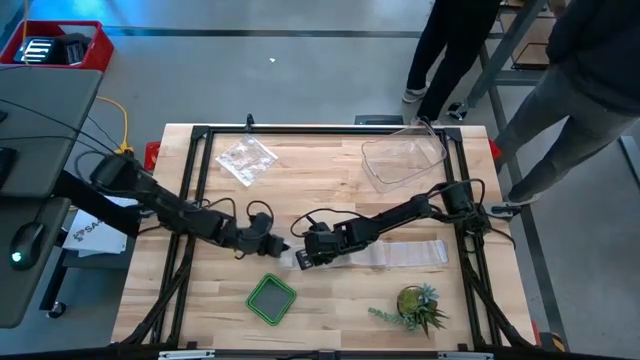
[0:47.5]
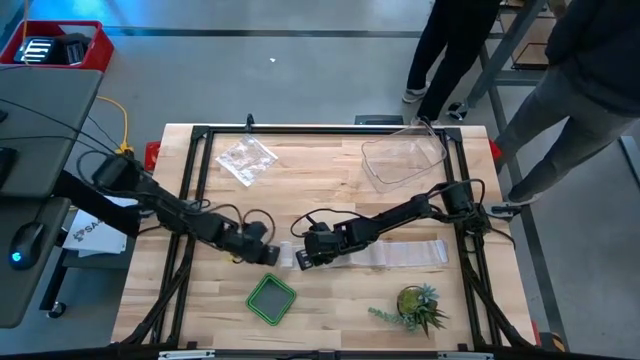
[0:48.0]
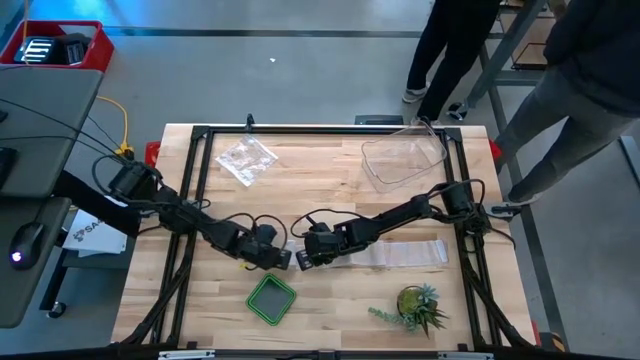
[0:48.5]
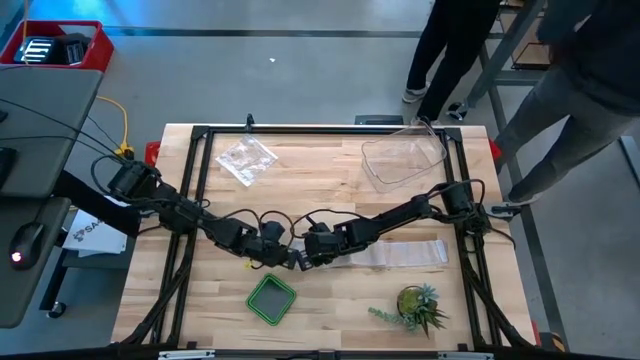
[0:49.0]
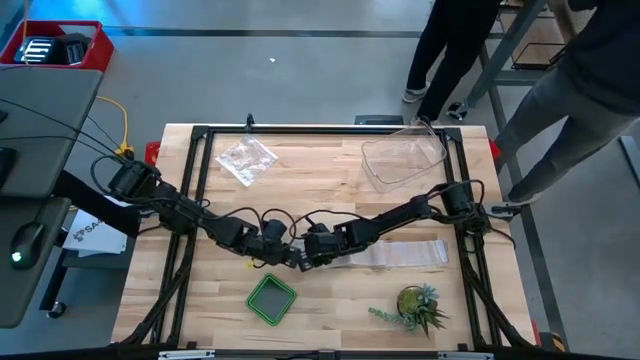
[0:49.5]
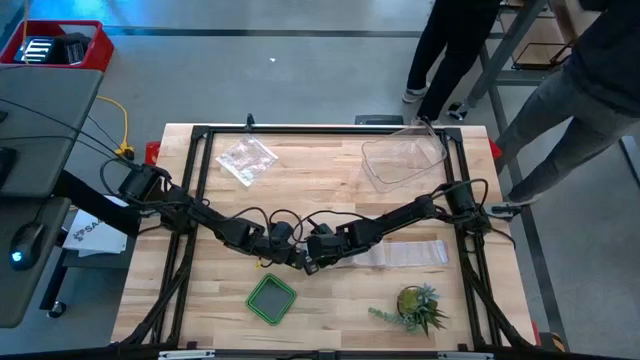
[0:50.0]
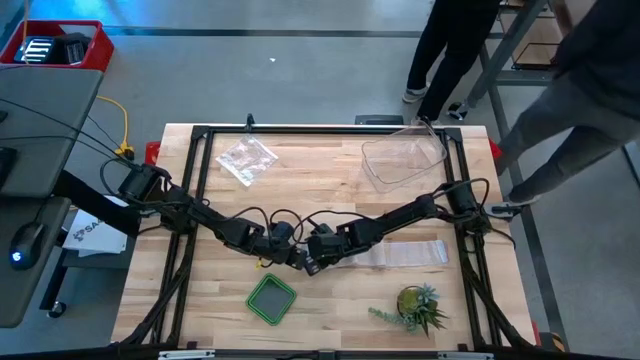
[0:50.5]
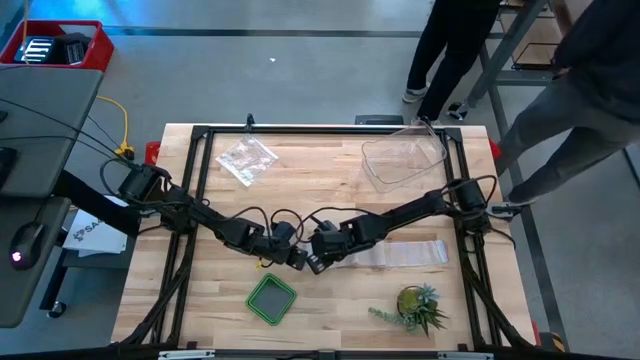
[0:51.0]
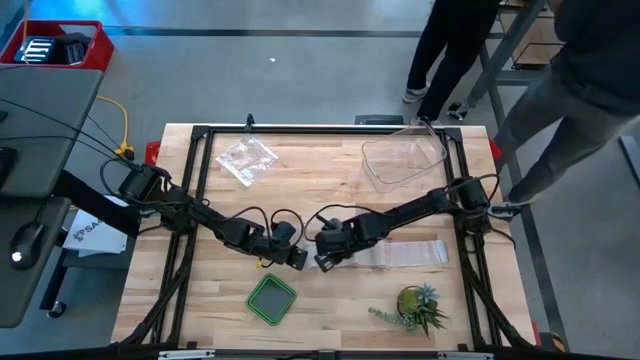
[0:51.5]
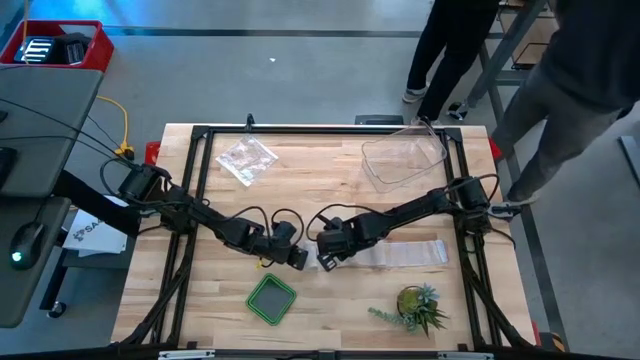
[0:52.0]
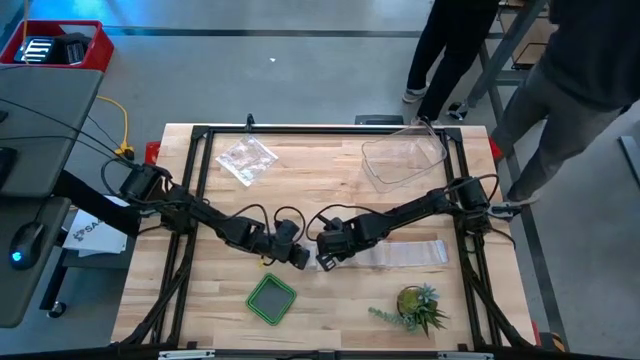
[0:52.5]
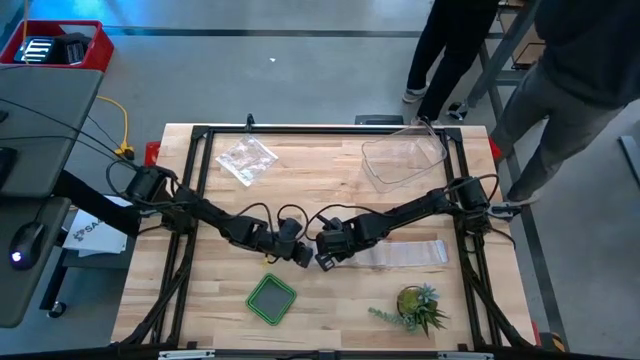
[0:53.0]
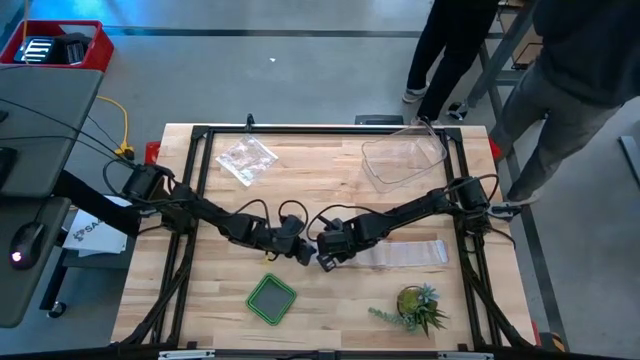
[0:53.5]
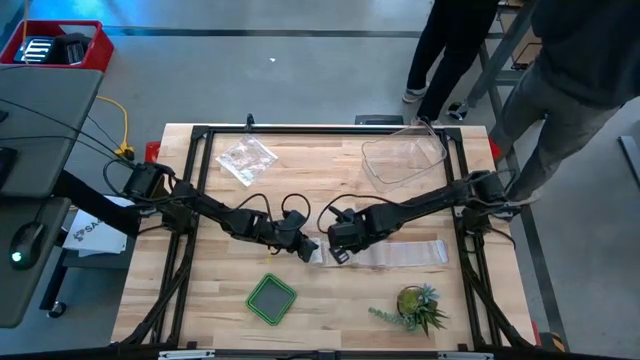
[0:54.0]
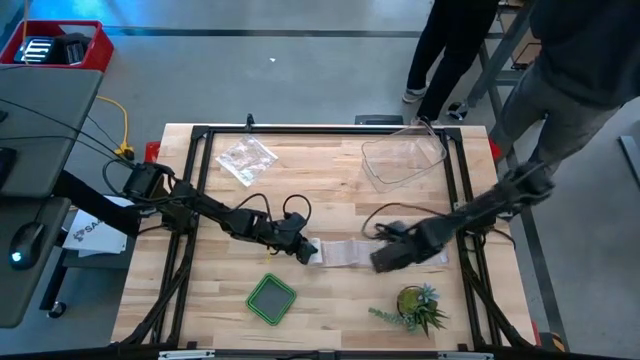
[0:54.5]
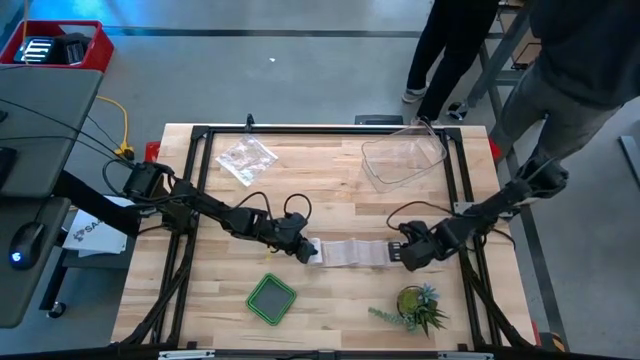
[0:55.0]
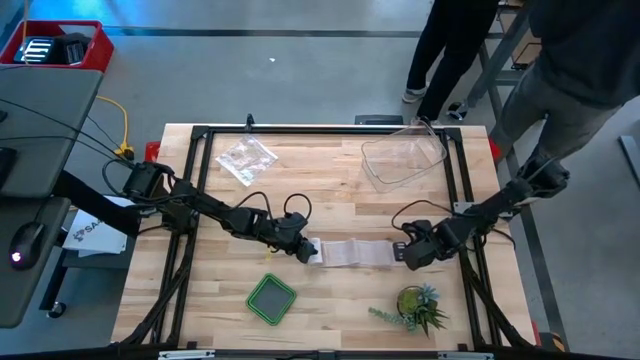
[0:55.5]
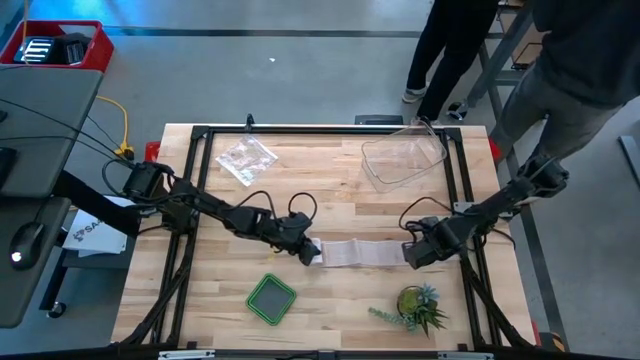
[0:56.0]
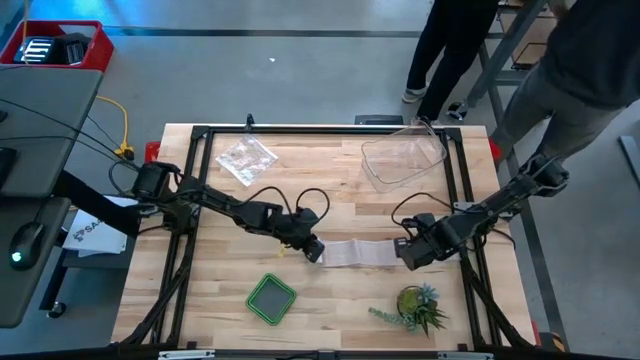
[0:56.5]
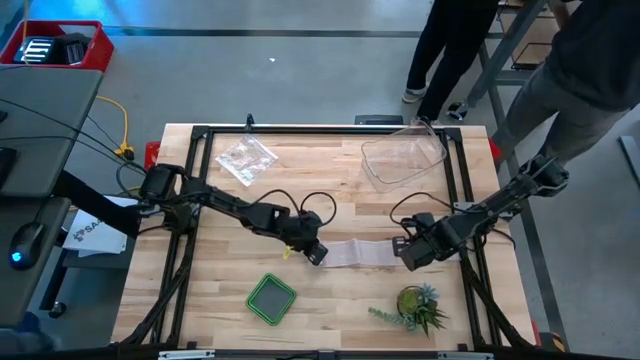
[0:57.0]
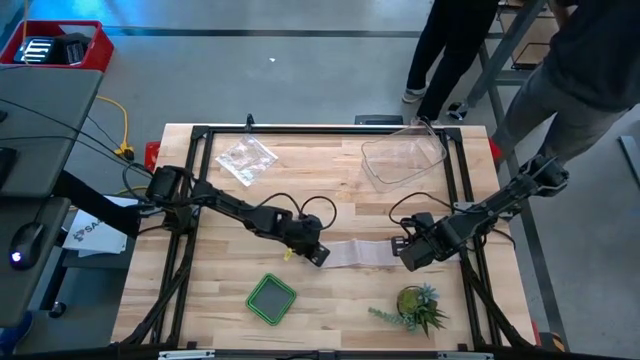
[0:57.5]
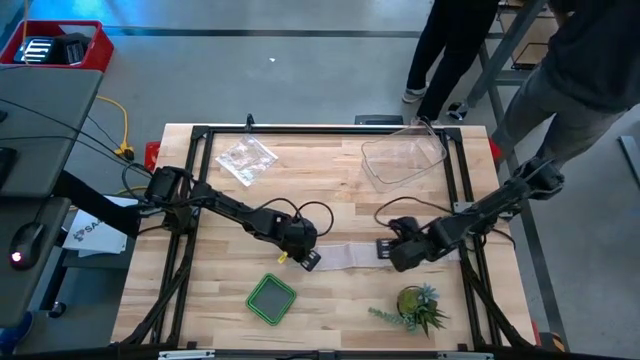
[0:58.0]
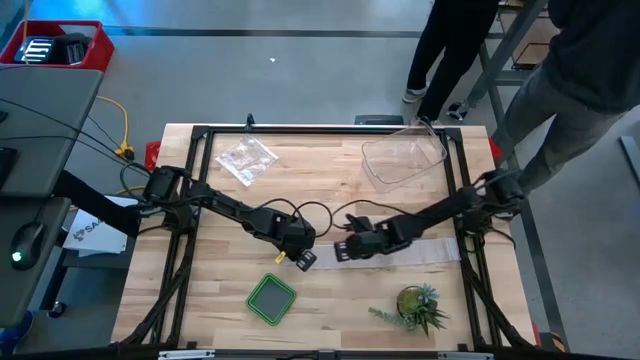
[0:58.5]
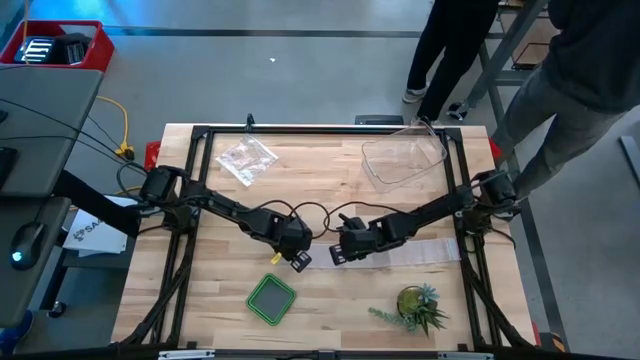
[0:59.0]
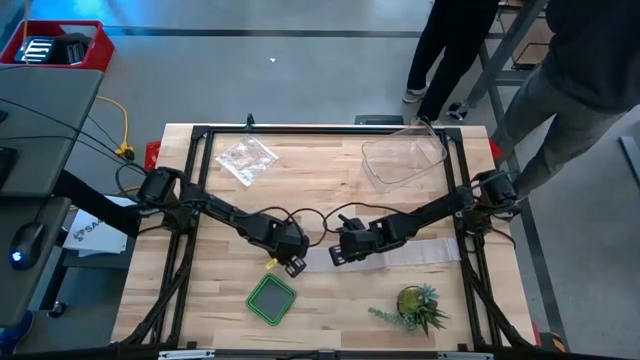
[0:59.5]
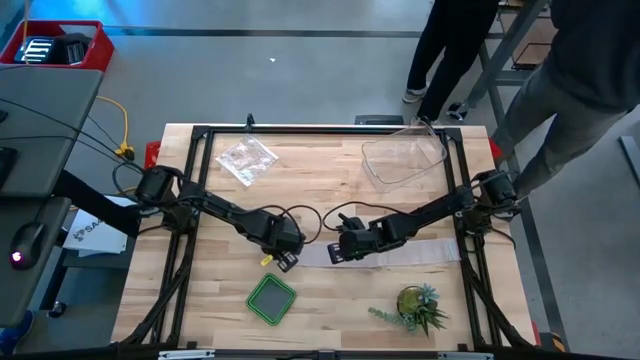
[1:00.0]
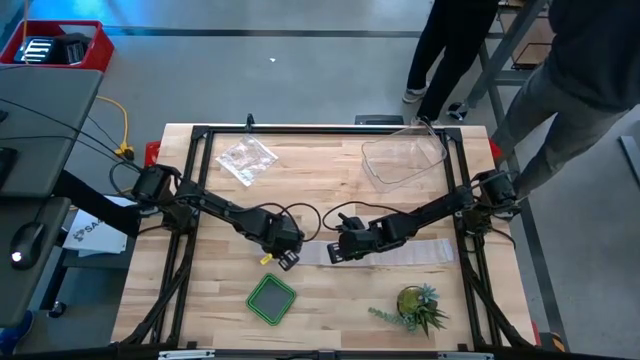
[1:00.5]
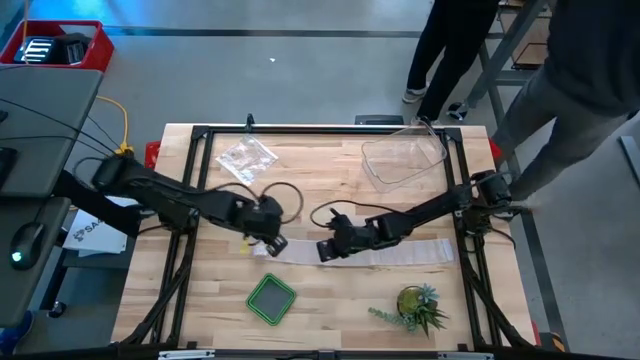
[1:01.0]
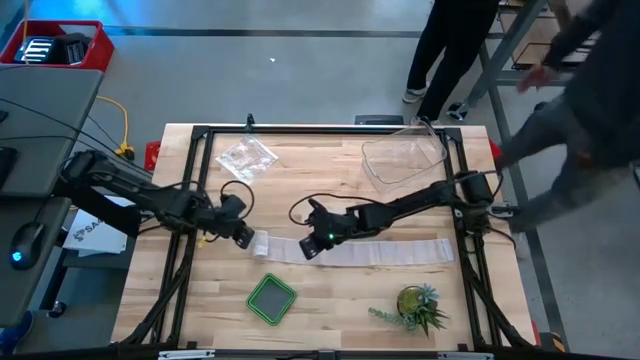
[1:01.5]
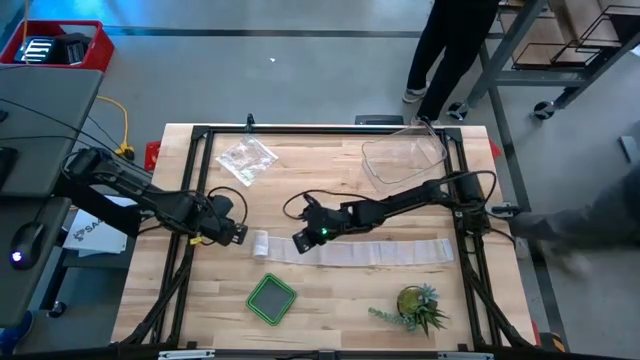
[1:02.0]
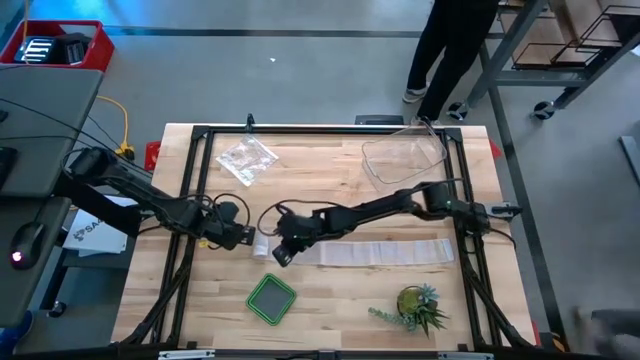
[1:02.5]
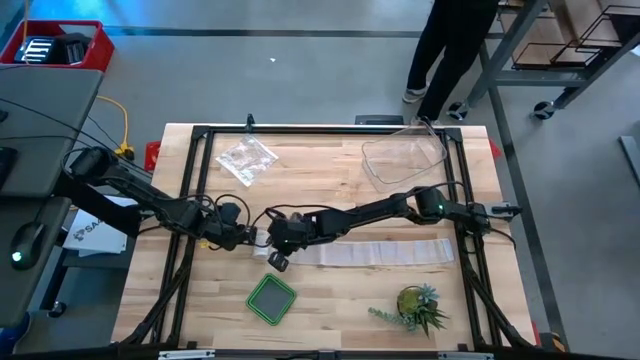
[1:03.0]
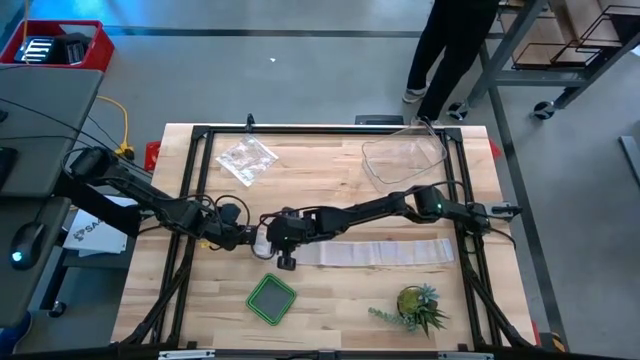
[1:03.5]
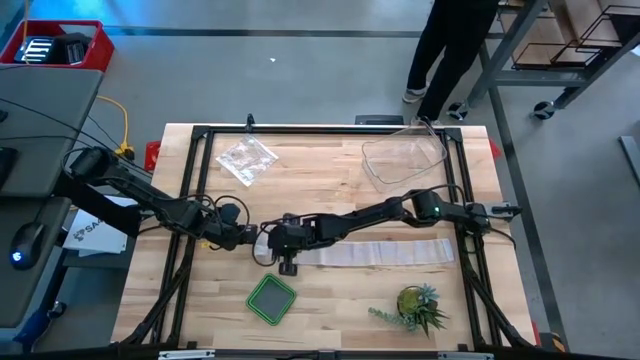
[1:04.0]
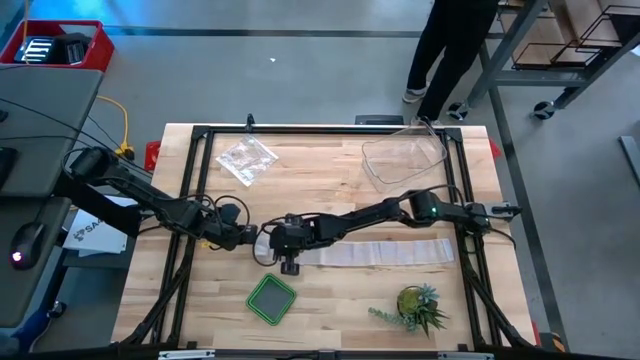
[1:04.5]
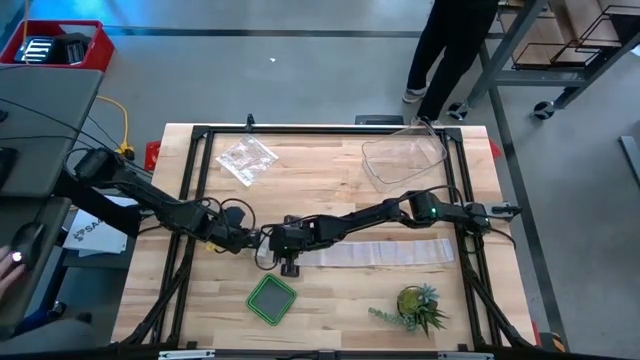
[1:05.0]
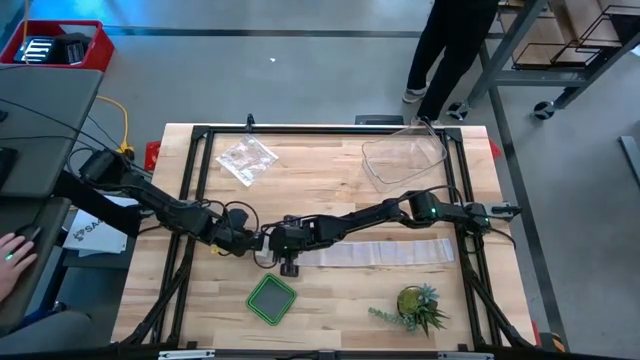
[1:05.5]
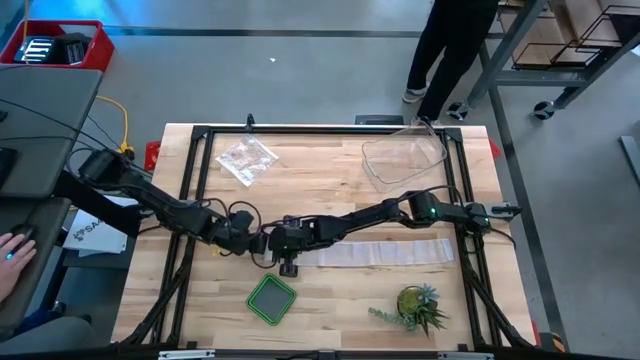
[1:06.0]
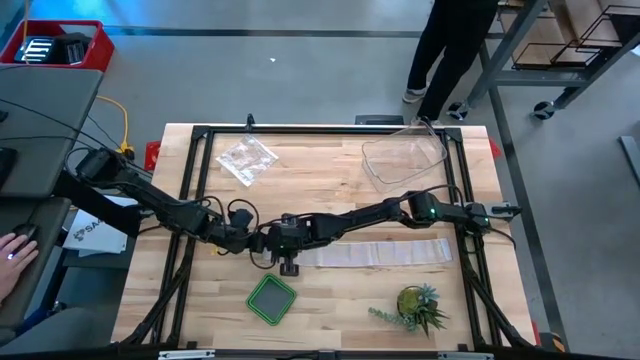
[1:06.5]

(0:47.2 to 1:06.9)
Task: Roll bandage
Roll the white bandage

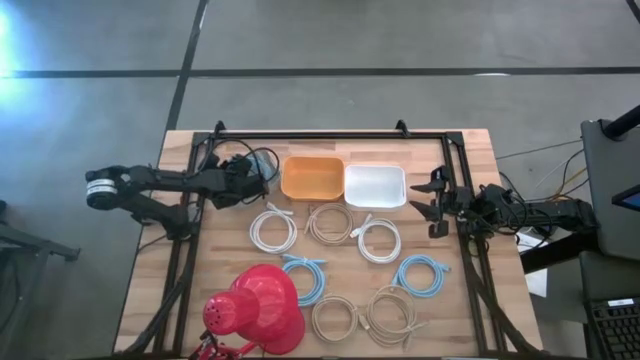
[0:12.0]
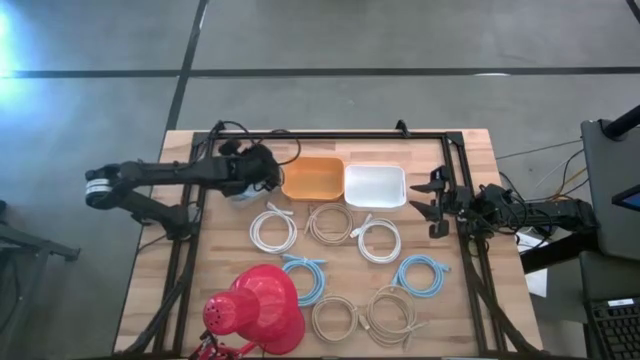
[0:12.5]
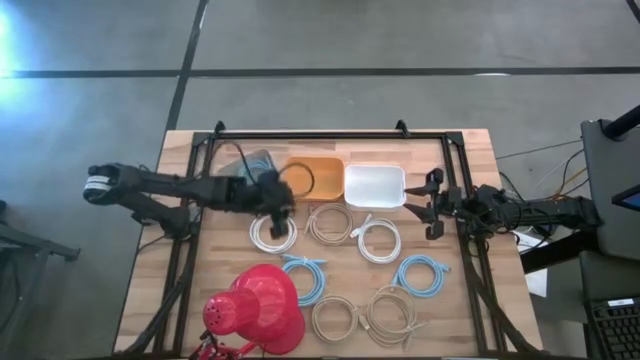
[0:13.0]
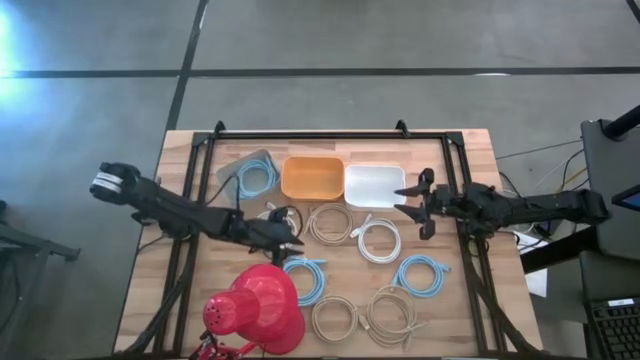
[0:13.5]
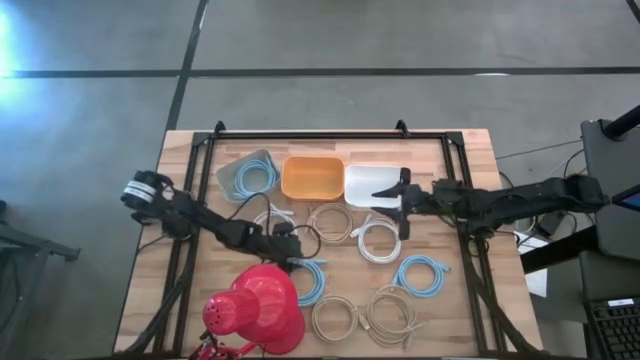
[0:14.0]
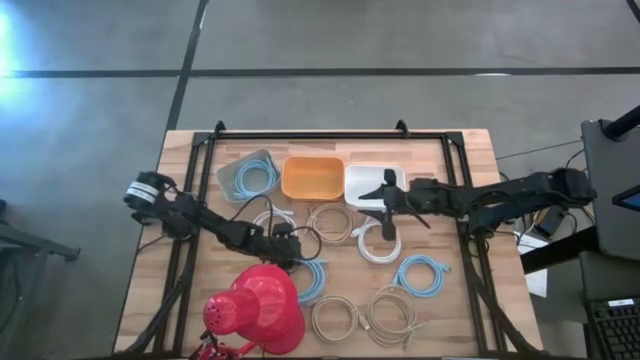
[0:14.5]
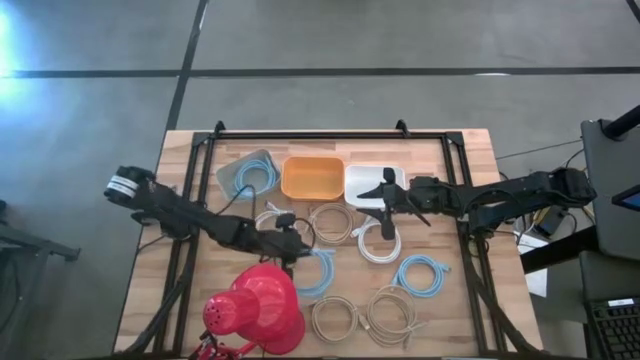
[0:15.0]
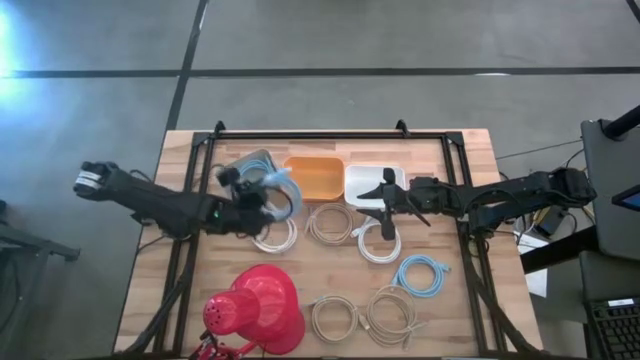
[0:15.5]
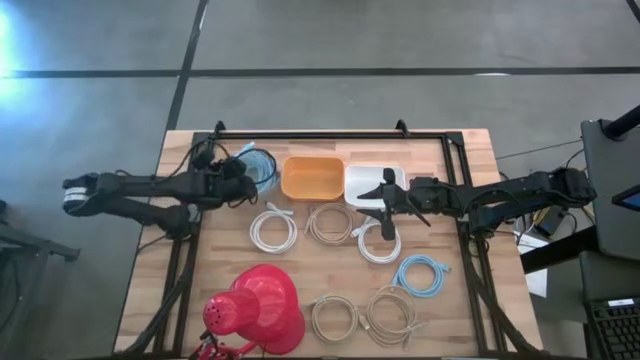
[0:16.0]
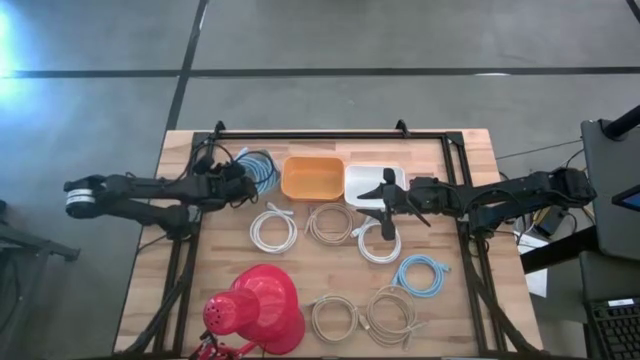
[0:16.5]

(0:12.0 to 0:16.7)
Task: Sort HDMI cables
Put the left light blue HDMI cable into the gray bin
